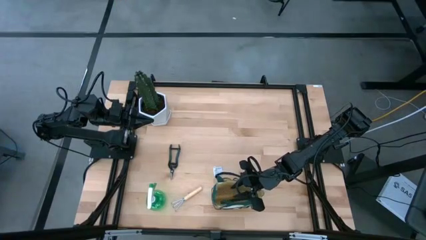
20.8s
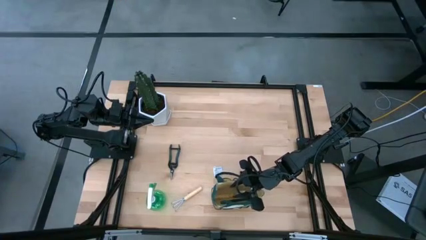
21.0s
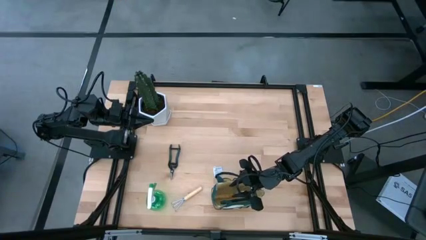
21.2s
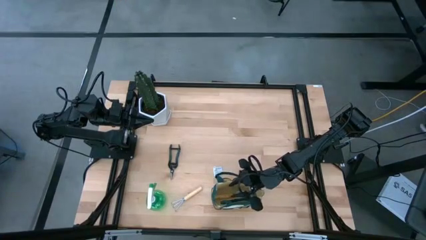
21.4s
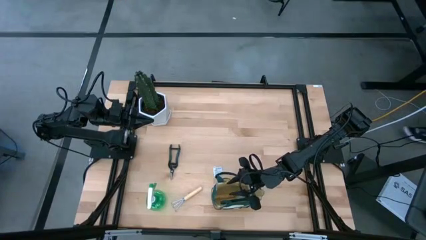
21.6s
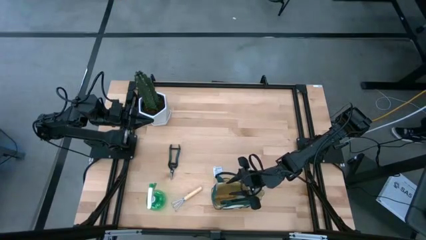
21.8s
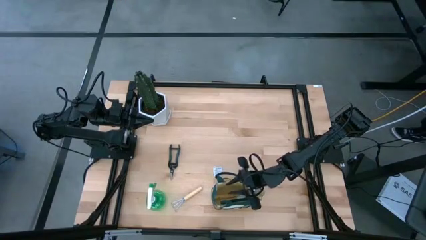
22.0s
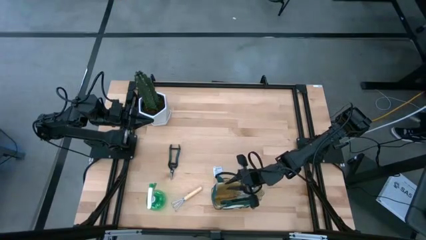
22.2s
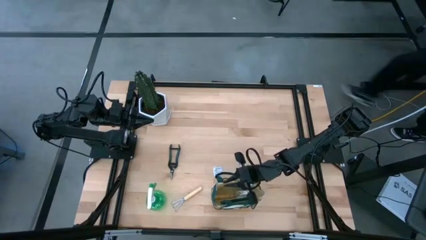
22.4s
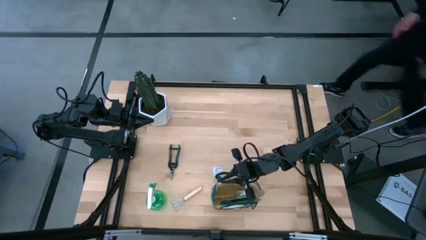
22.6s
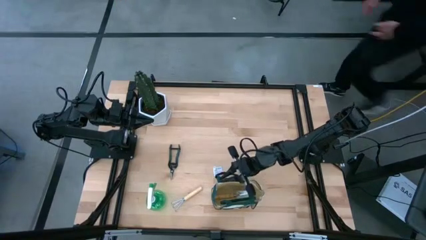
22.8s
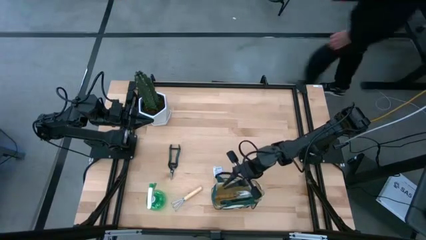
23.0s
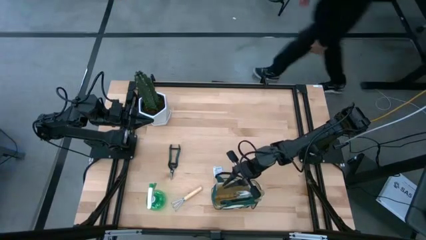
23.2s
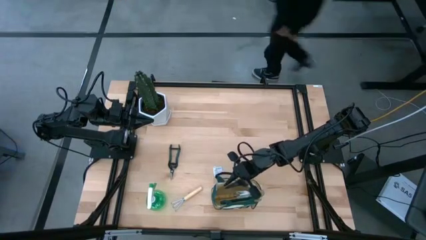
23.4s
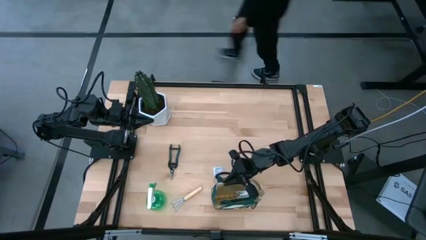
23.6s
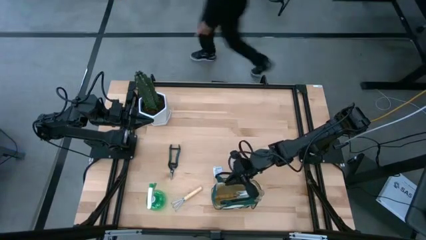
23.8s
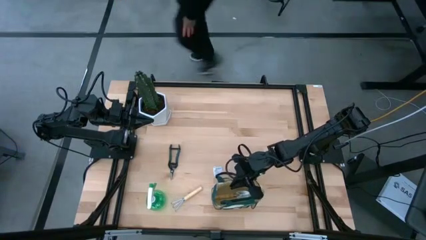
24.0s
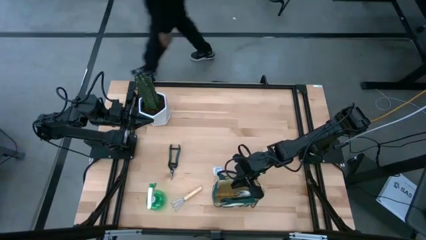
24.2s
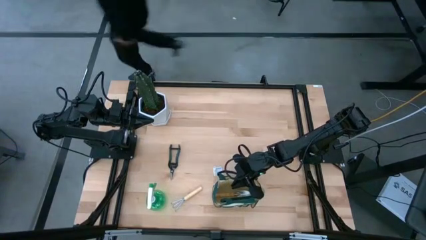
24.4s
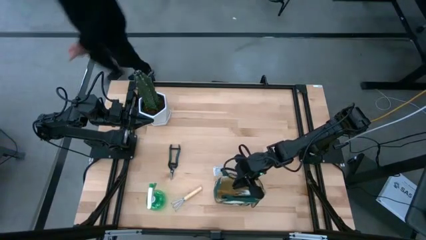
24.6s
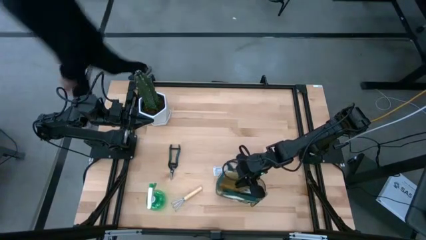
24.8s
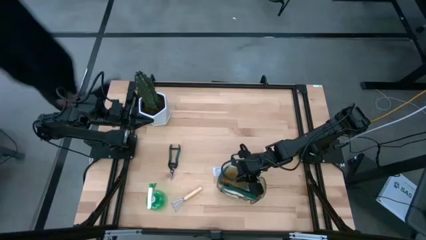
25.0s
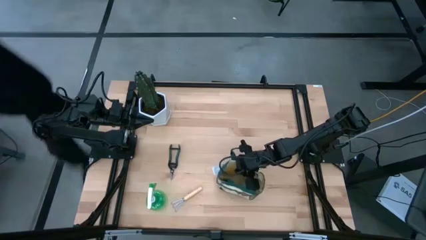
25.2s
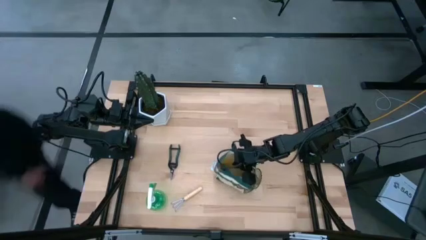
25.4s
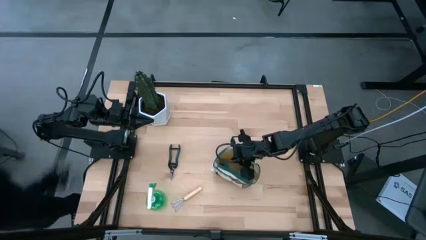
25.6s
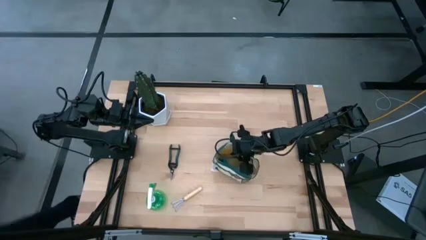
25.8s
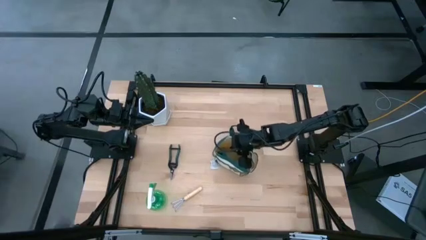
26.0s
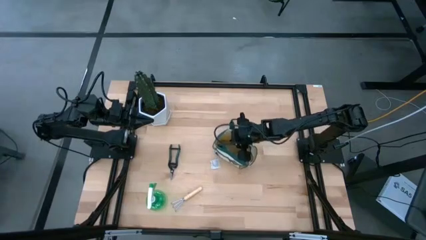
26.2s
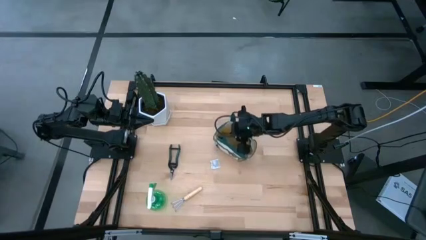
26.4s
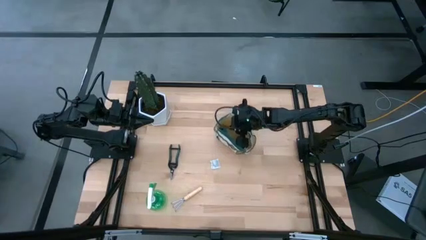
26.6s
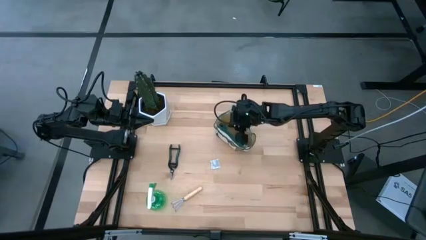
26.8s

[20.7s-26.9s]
Task: Pick & Place Garden tools in Gardening bag
Move the gardening bag to the center of the table

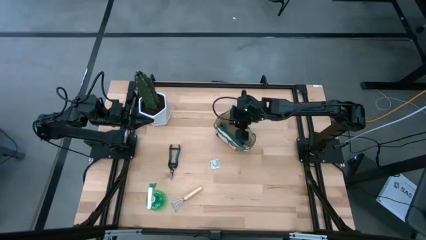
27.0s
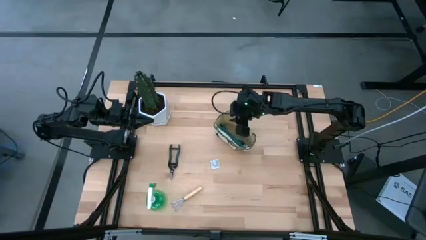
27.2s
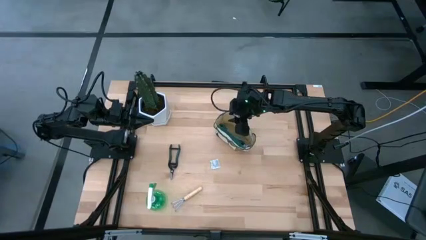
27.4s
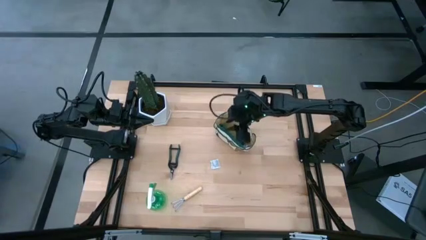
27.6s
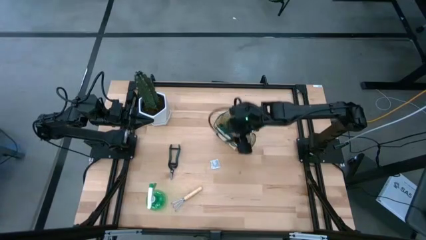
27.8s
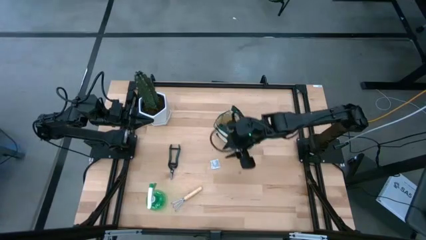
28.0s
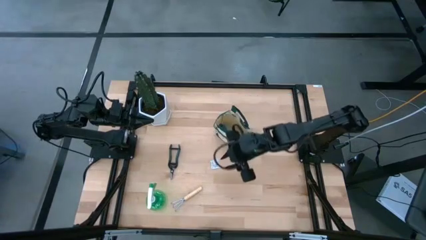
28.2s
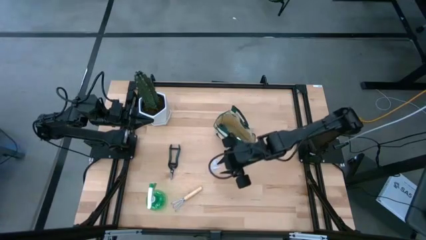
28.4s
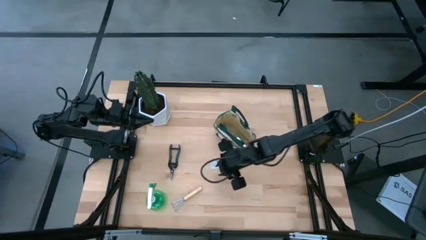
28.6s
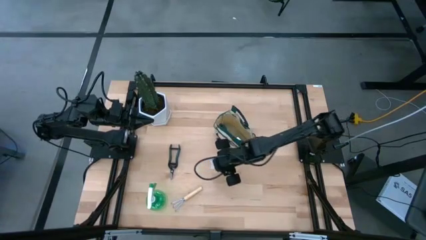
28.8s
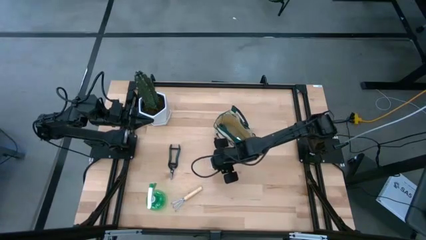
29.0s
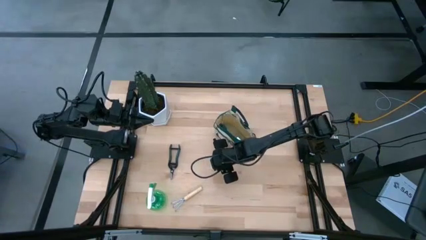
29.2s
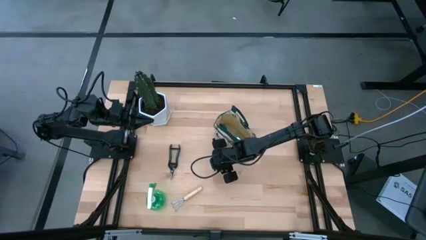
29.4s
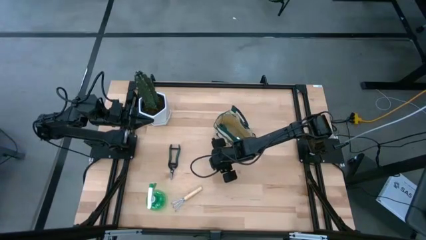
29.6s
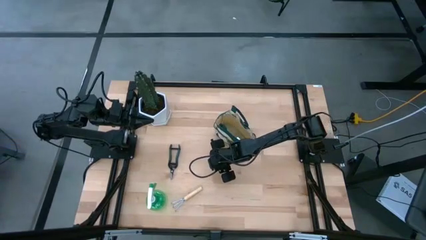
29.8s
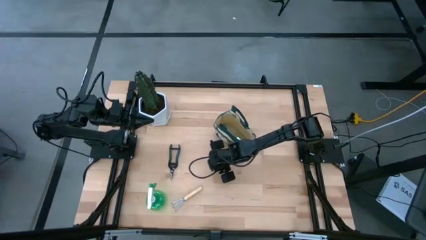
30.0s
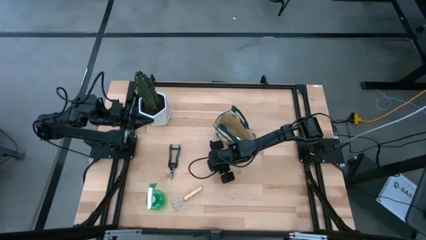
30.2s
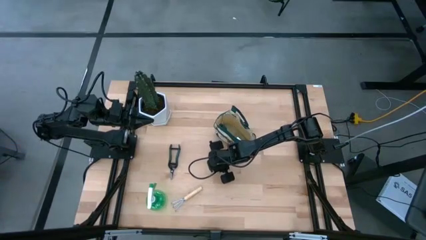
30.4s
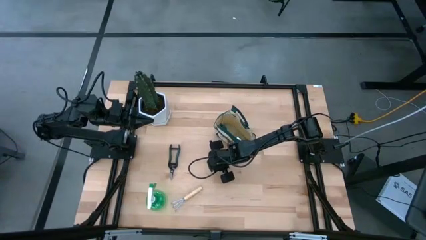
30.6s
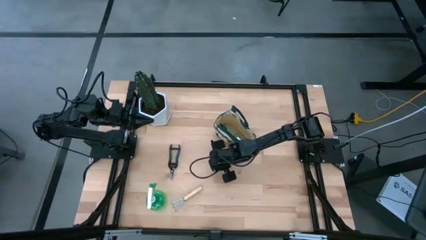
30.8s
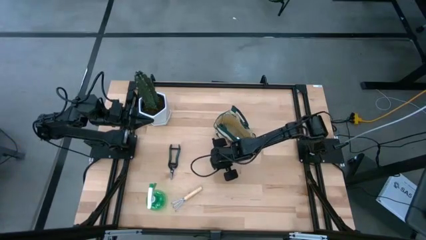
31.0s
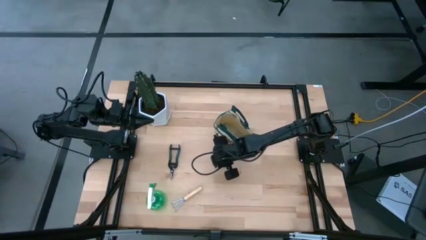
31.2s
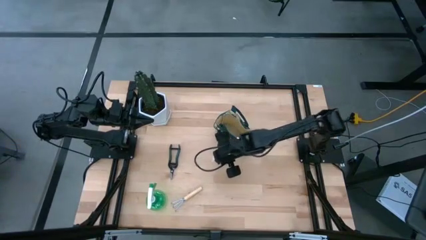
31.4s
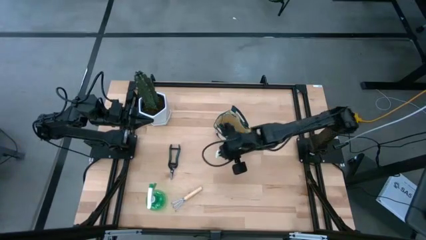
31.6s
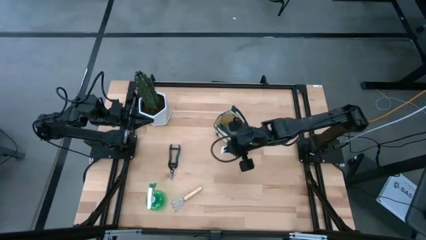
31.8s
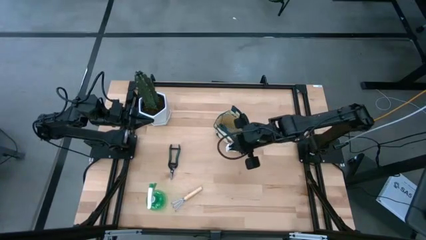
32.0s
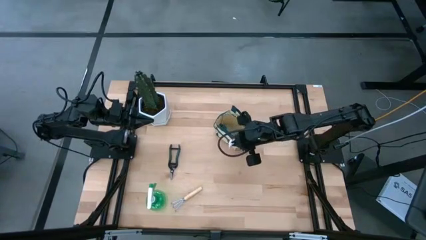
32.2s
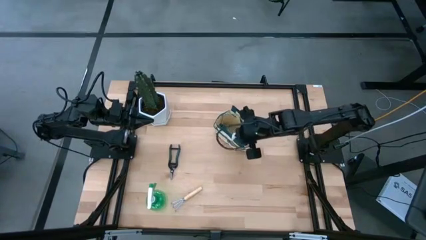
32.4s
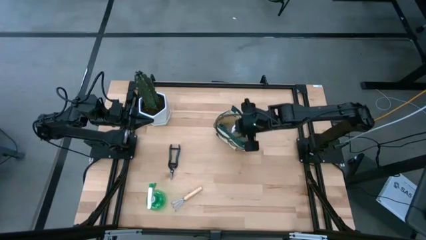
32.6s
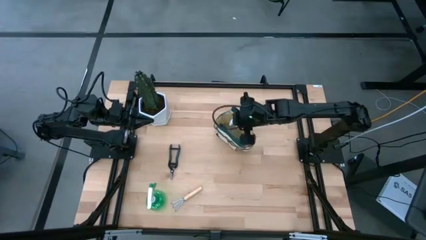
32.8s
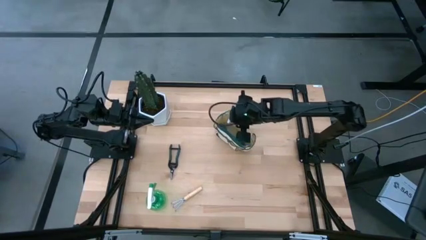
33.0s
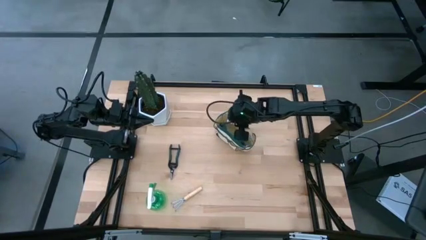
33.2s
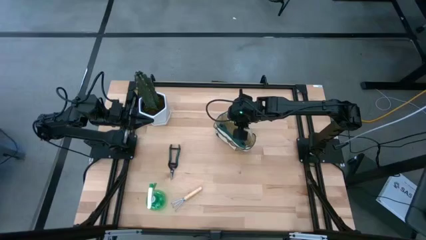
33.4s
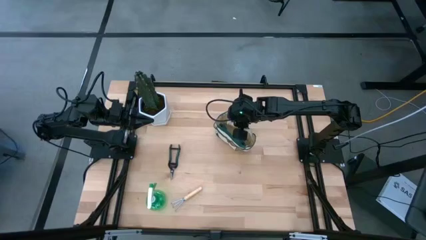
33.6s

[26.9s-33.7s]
Put the white silica gel packet into the gardening bag

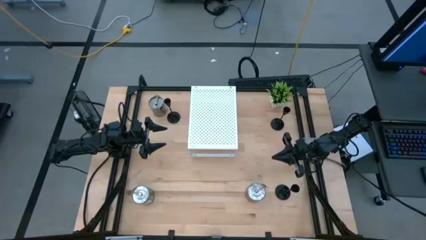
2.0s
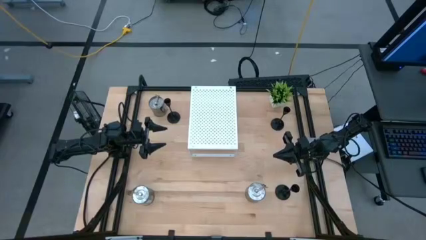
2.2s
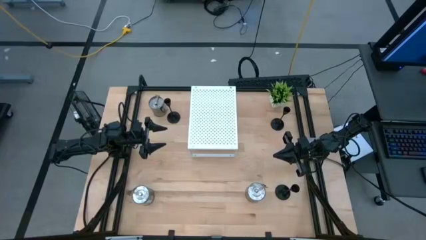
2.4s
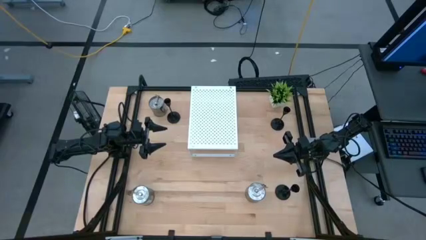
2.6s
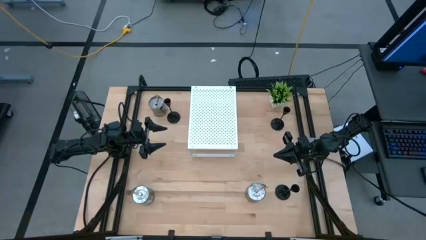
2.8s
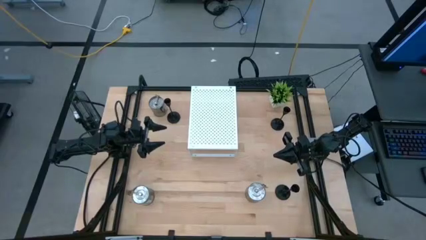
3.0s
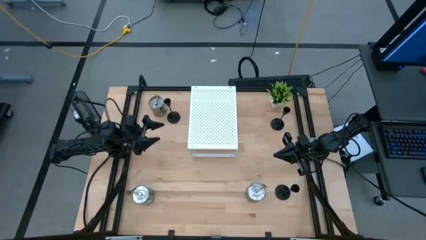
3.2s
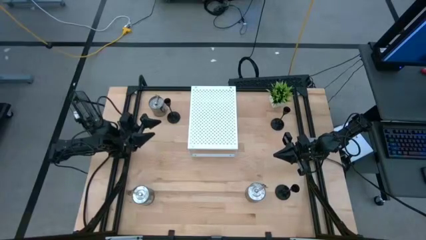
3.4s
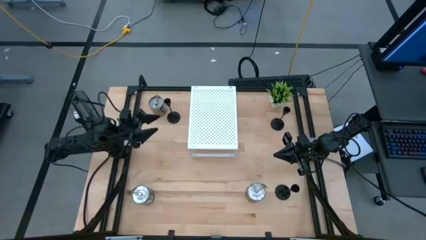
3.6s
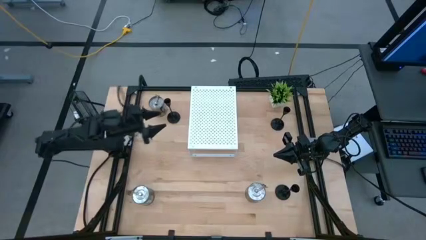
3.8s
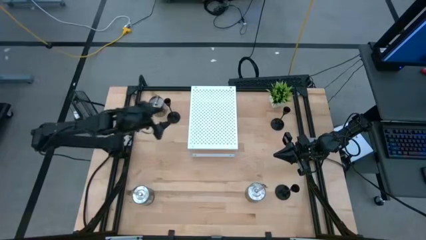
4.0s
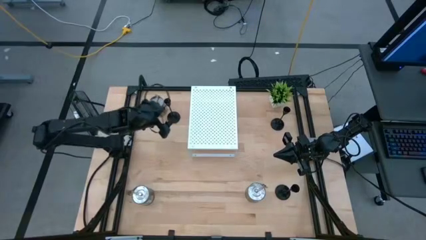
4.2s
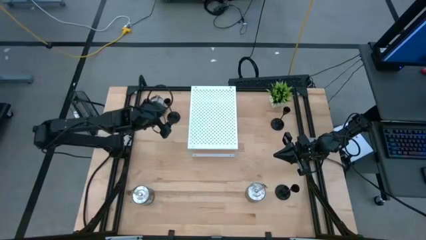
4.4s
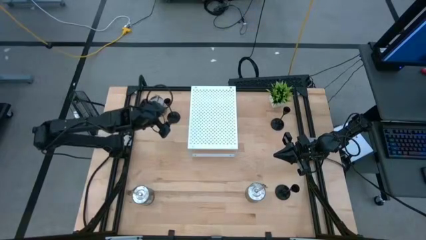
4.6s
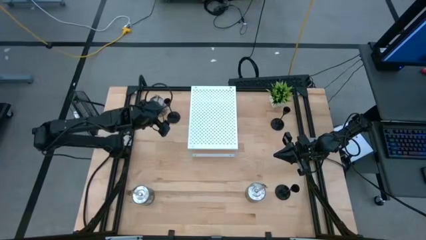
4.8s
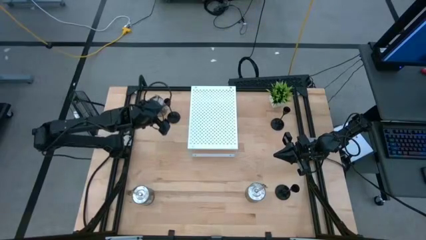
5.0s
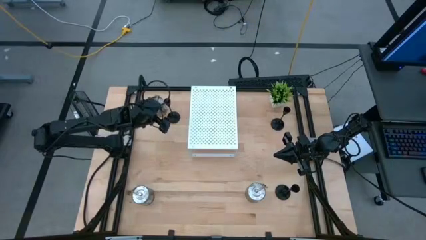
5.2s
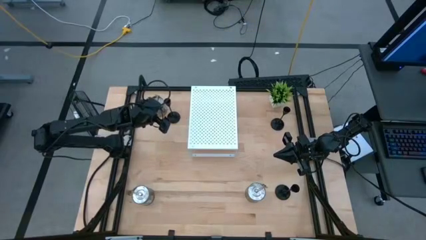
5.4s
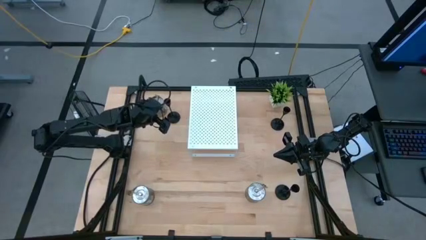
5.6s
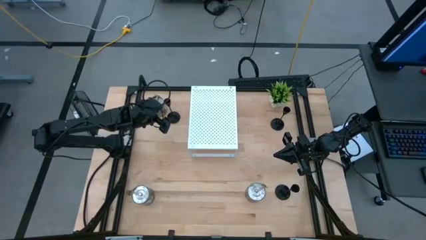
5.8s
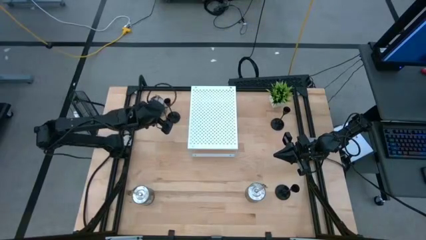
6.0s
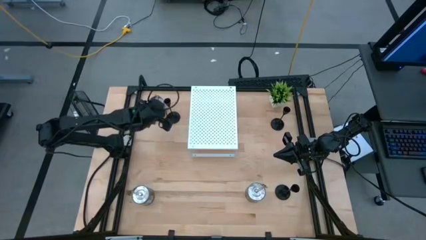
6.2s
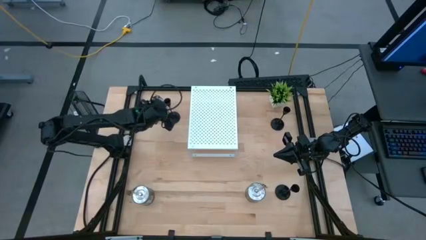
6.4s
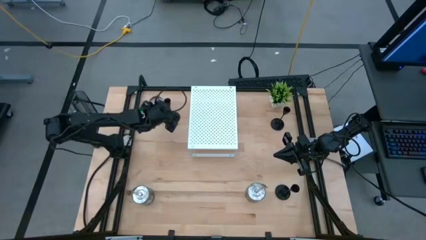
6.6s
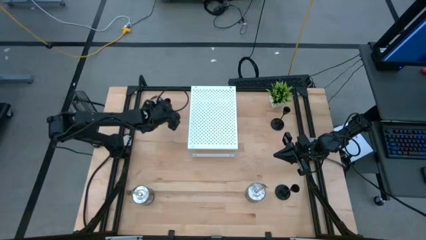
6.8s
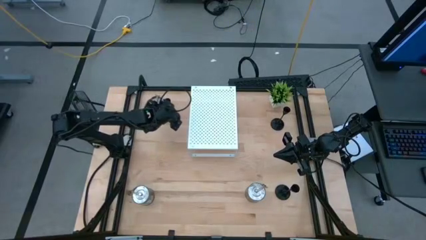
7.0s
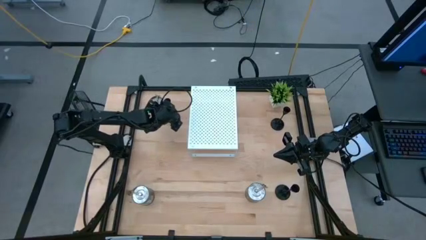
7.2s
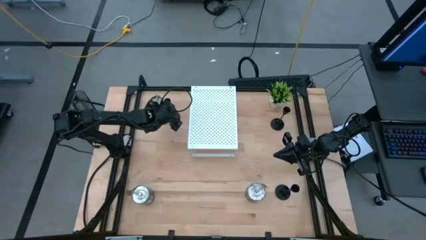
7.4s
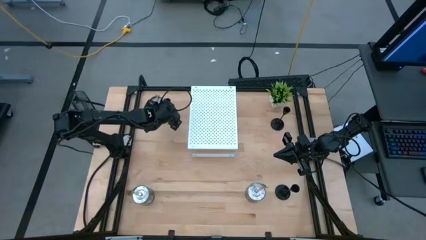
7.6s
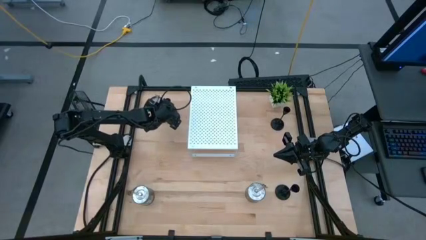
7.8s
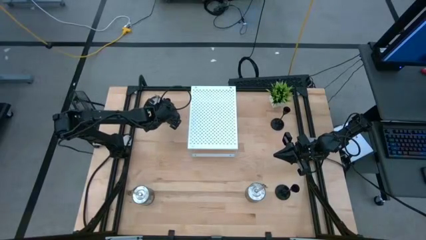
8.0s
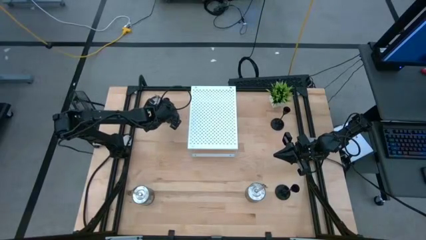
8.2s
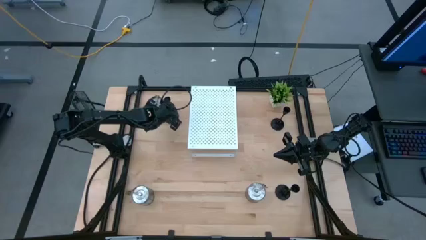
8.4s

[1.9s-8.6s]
Task: Pick & Place candle stick holders
Put the top left black candle holder on the shelf
